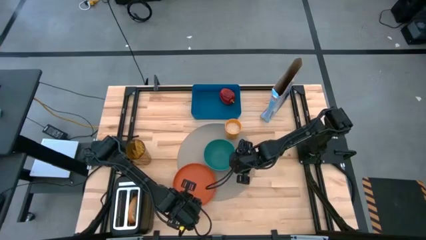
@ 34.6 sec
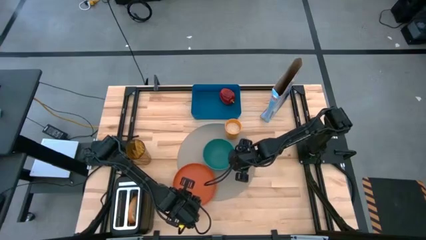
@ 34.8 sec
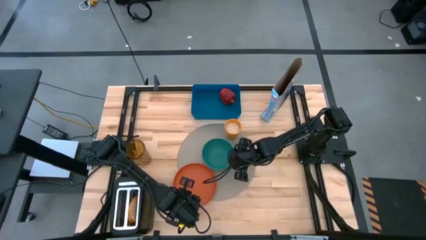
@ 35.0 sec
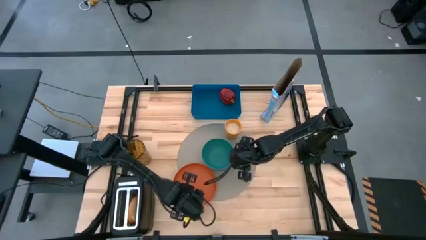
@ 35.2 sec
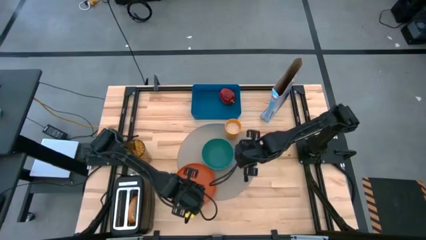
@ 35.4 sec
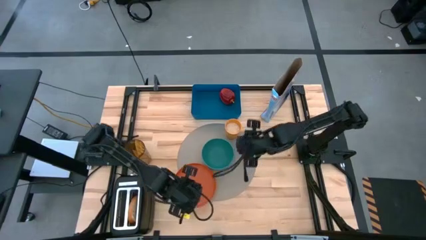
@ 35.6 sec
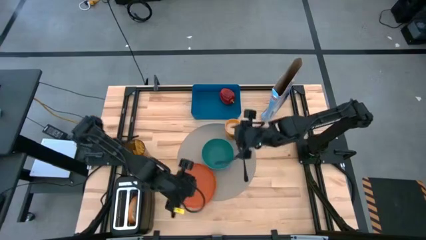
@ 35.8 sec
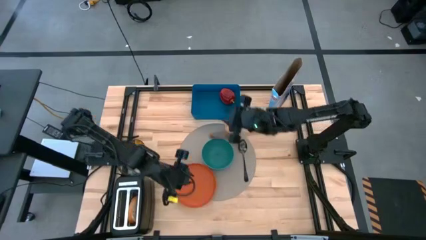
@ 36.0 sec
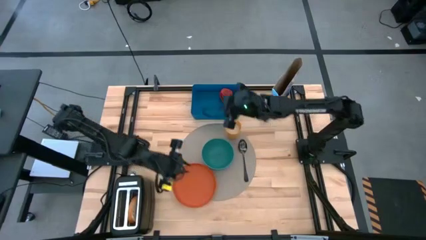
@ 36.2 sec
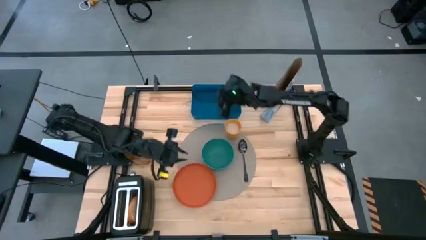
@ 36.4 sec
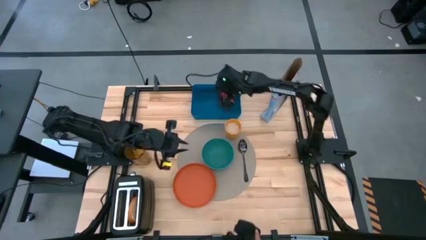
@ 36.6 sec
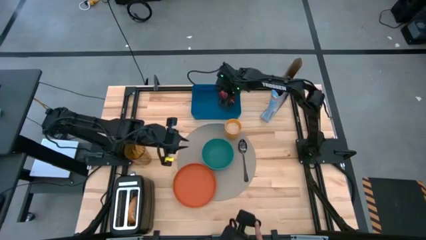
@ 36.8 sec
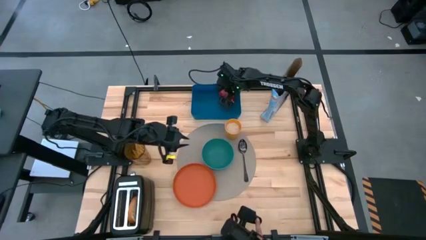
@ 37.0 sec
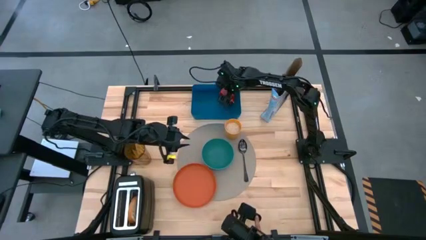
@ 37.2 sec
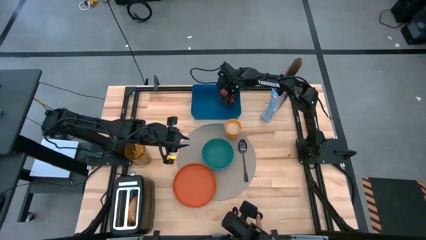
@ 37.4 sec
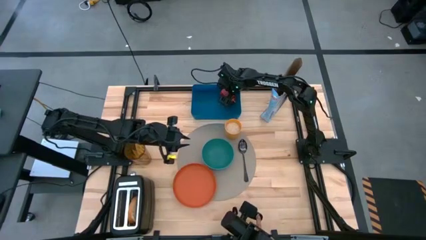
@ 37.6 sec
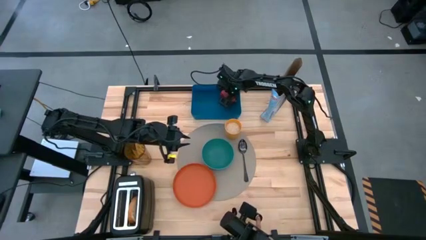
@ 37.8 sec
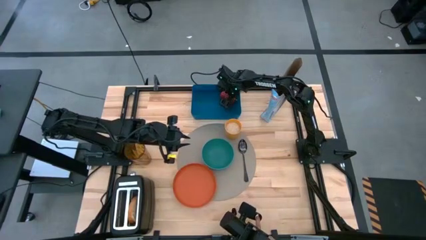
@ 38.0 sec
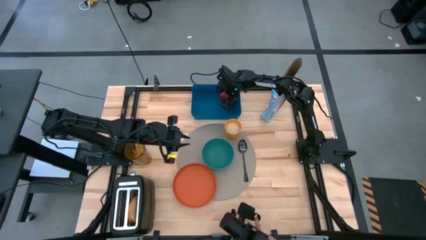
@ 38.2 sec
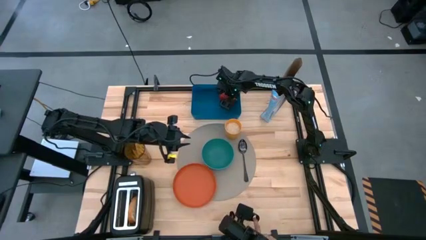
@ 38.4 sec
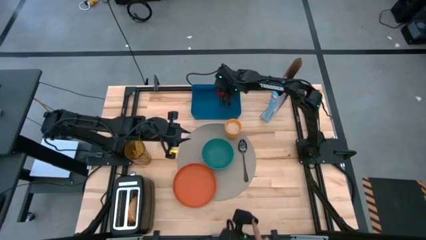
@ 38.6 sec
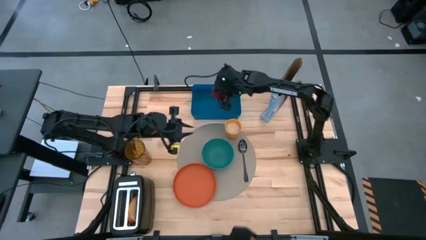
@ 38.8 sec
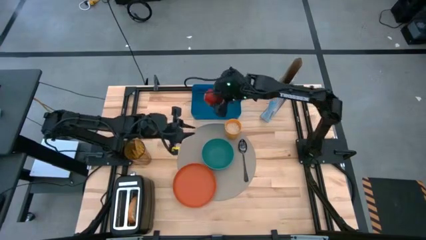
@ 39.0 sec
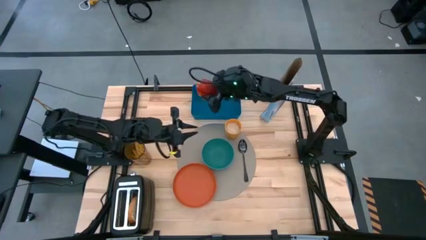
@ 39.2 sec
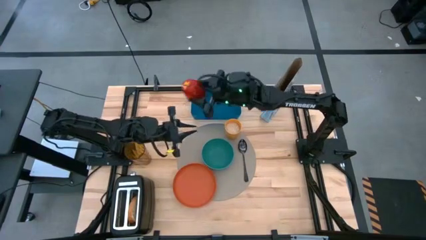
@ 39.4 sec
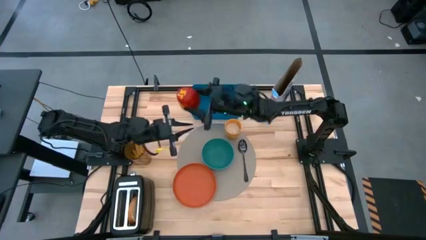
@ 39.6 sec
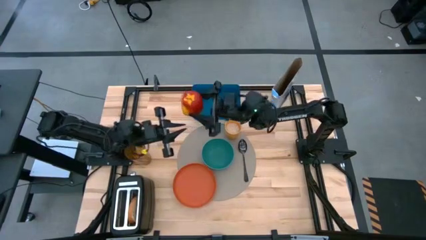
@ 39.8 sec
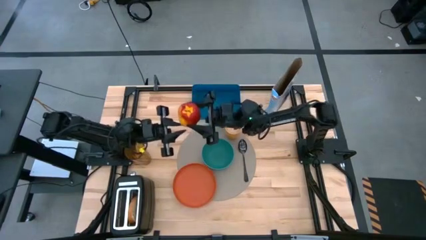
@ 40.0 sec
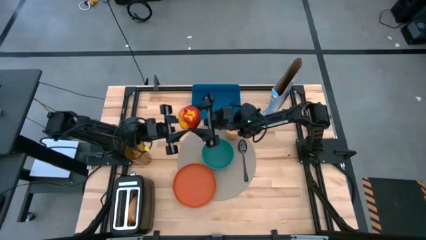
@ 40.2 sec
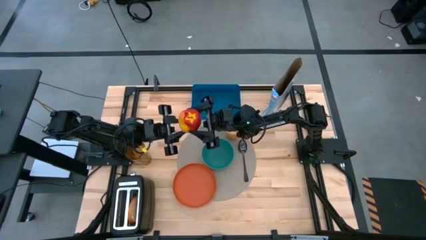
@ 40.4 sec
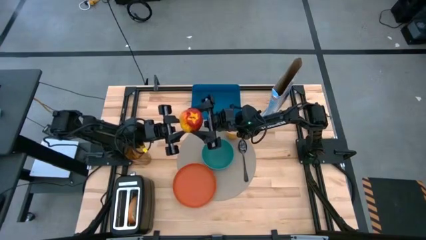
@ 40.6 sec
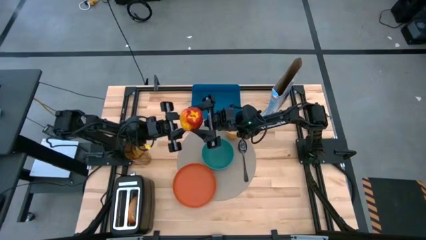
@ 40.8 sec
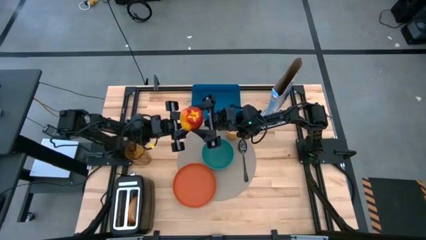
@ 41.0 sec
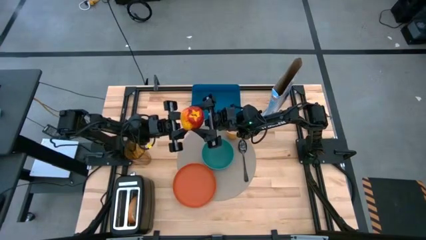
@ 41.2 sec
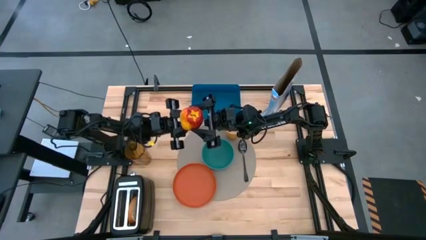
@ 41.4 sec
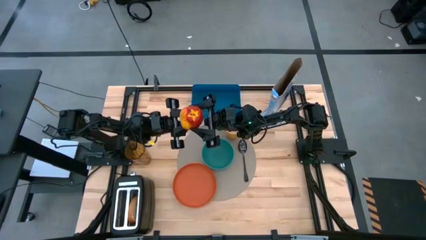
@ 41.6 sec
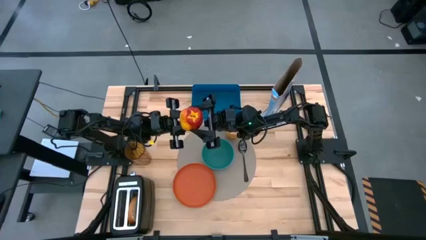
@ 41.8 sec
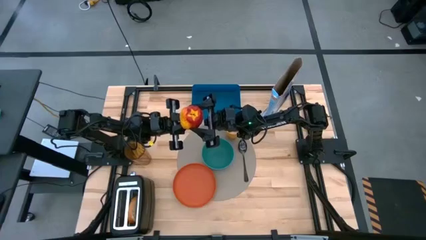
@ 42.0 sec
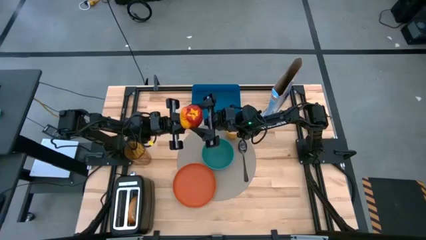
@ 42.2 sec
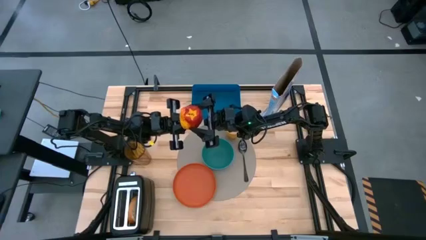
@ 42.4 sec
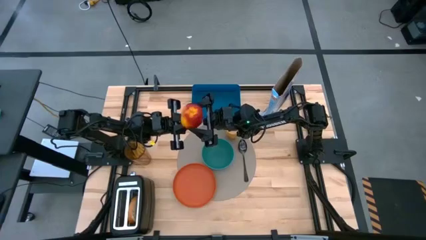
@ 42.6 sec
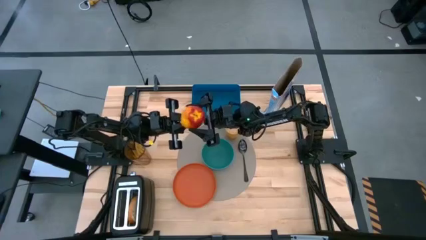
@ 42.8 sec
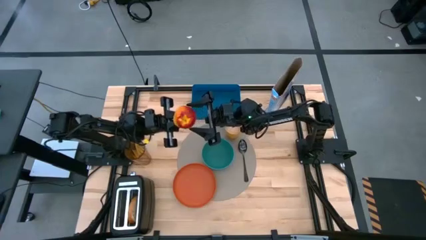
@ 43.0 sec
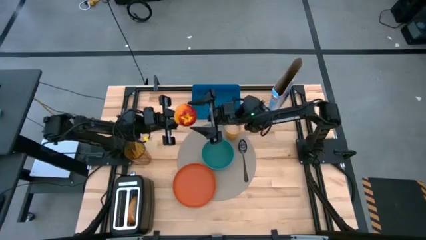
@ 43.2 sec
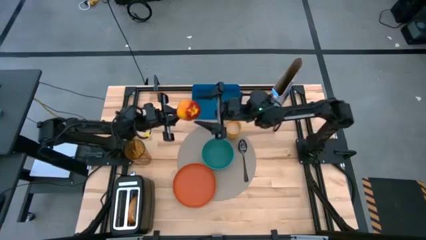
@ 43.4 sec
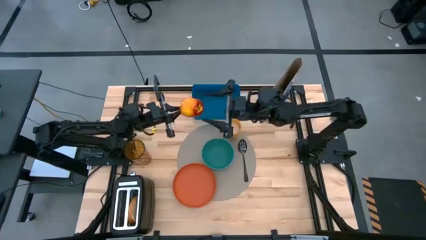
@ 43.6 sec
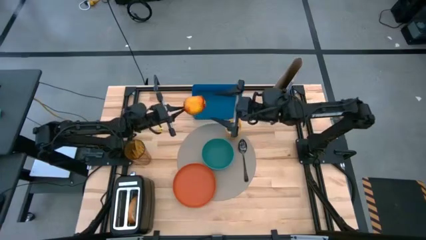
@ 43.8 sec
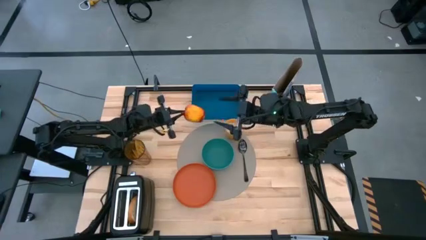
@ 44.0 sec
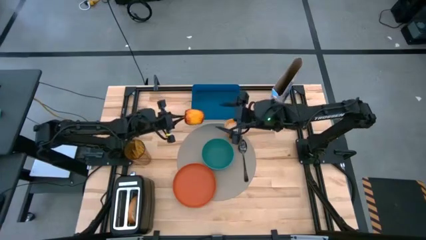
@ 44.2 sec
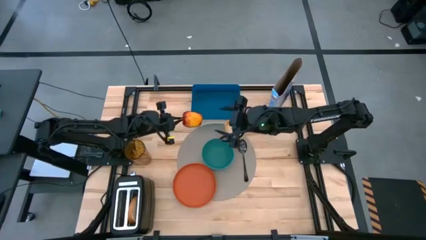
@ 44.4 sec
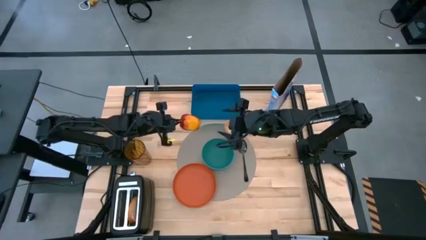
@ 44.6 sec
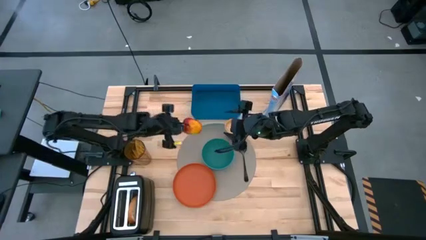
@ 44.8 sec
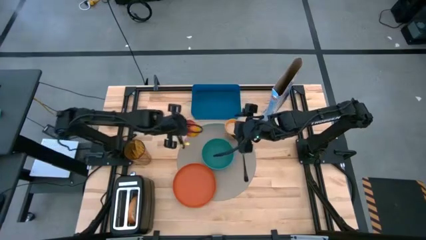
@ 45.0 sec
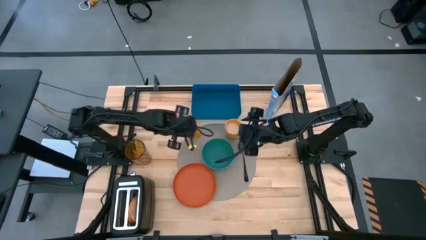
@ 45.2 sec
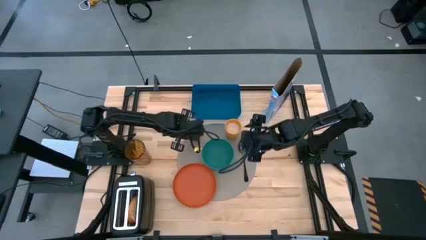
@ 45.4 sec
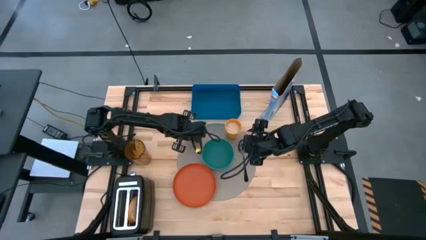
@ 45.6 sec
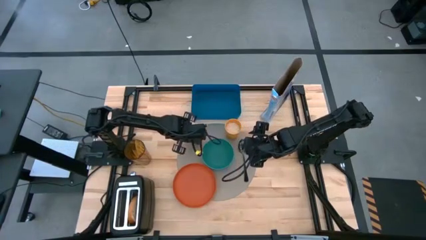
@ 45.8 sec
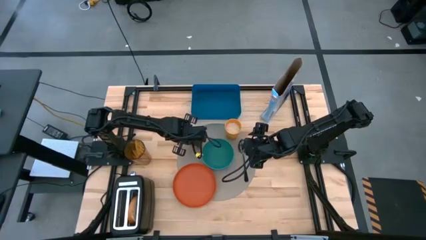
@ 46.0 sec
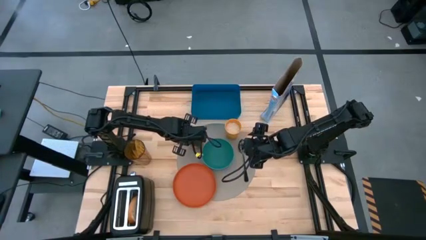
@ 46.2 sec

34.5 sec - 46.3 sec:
Task: Arrange a breakfast setting
Put the red apple on the top left of the gray table mat

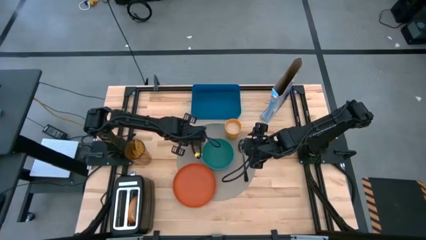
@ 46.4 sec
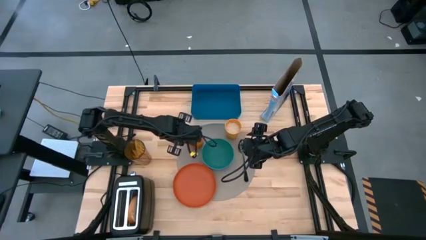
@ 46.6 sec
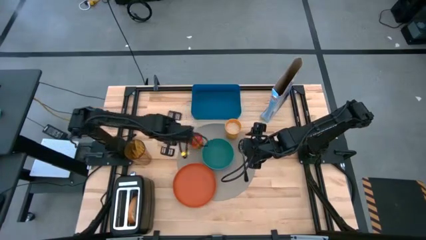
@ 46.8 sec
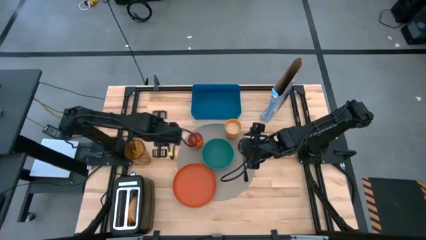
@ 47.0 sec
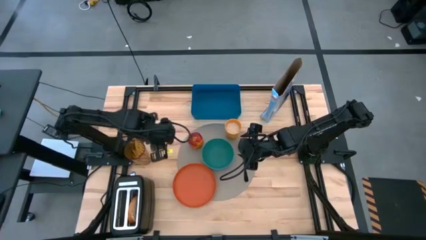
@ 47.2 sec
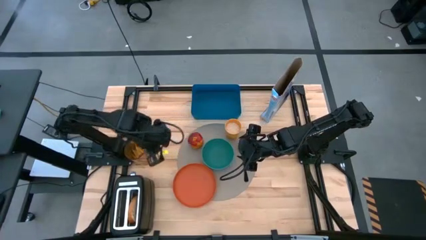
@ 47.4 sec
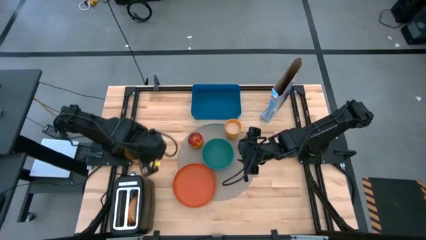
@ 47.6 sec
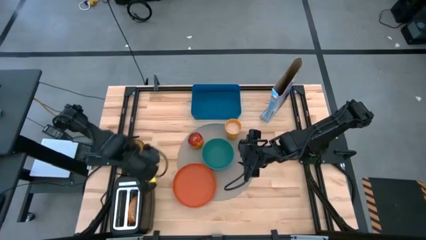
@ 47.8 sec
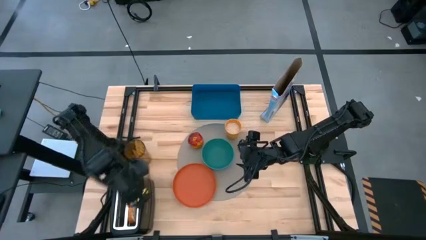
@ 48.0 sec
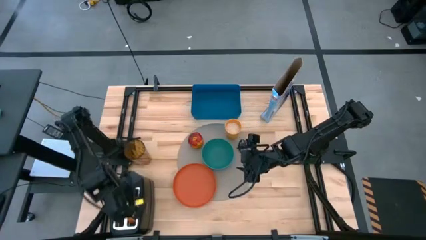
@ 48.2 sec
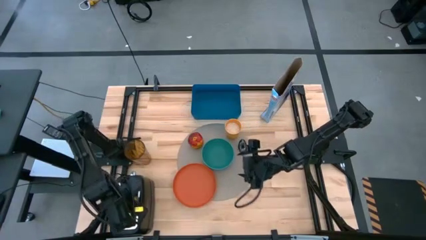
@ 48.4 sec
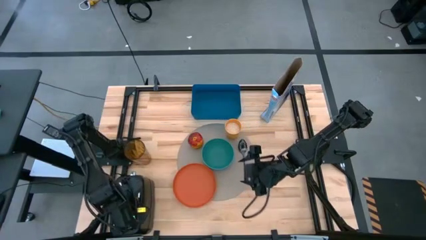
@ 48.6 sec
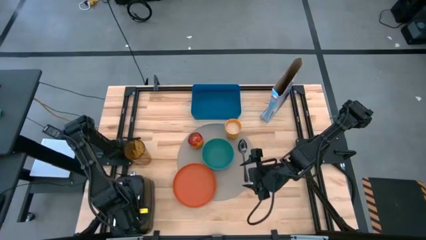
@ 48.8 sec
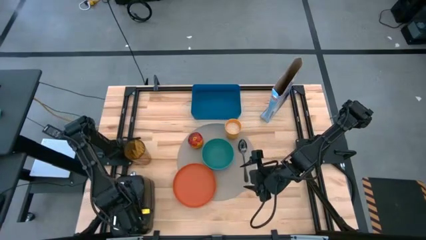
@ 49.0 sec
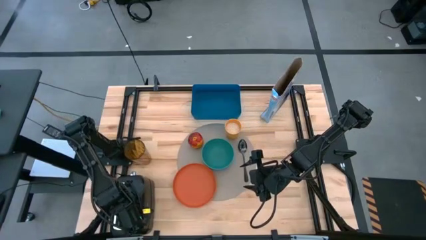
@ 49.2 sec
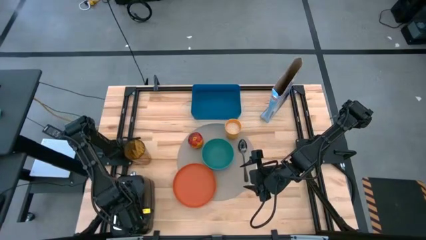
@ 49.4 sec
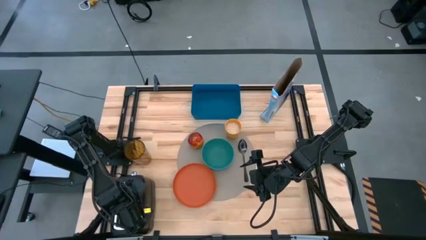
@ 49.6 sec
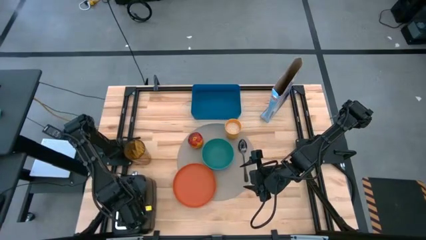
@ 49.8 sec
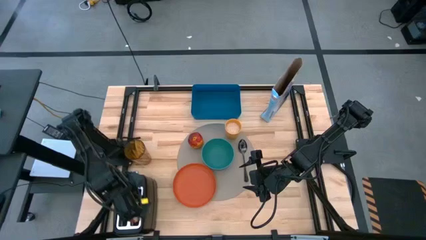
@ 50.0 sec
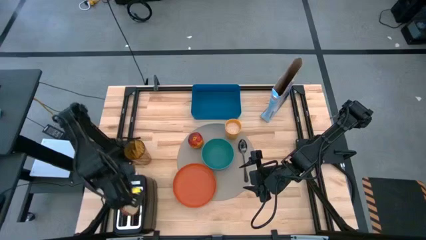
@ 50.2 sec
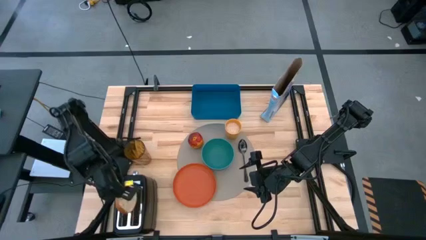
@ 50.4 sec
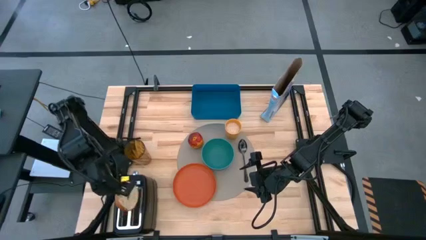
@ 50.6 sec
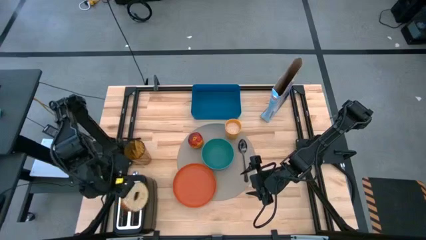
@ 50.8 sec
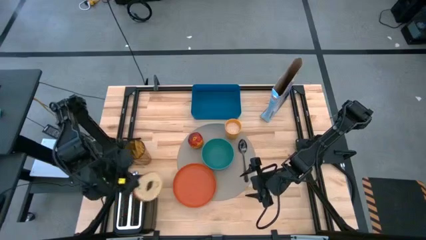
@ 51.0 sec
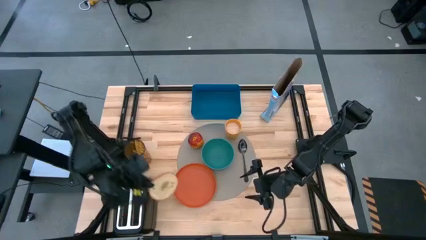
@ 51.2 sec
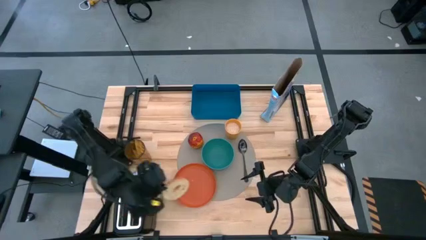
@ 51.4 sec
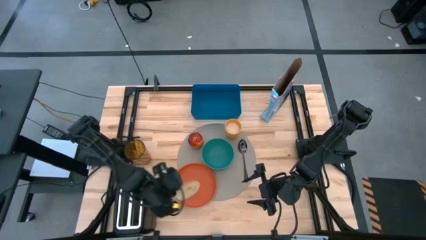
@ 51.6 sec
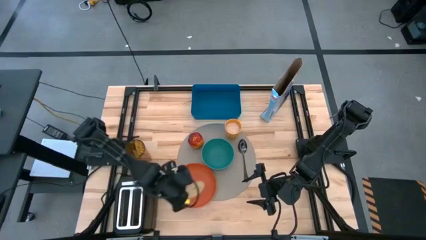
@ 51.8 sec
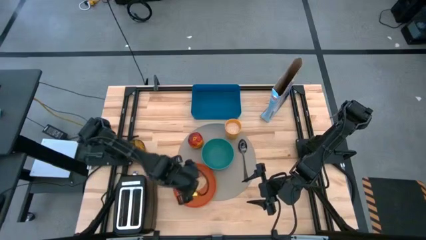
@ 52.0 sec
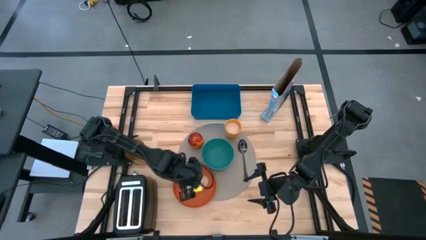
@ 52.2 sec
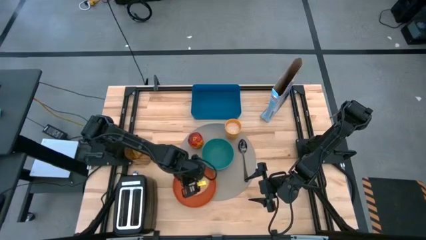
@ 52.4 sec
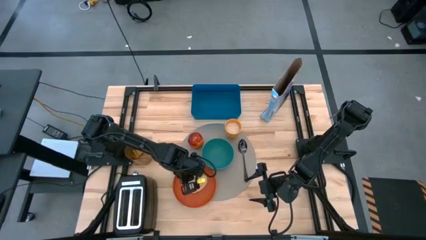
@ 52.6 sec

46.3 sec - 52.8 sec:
Put the bagel on the orange plate
